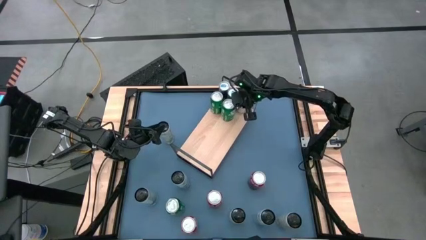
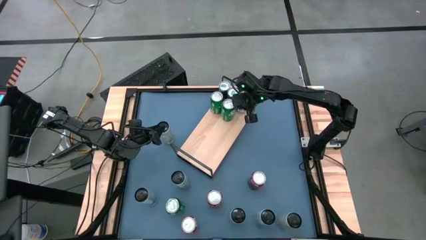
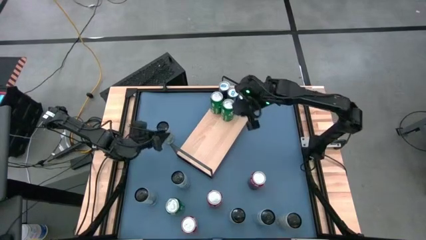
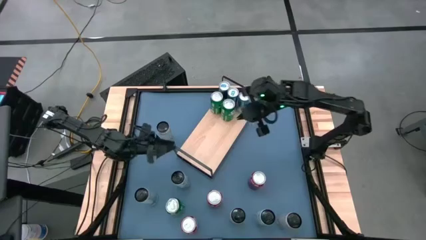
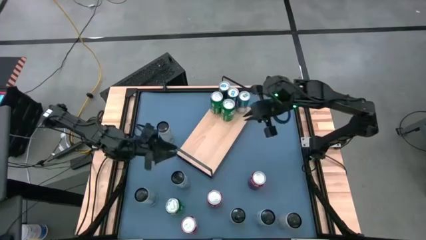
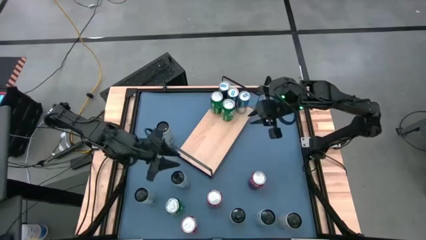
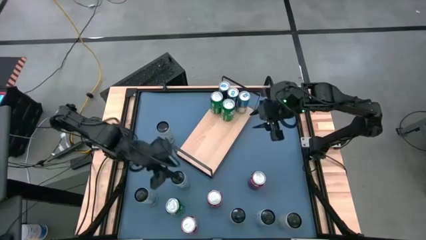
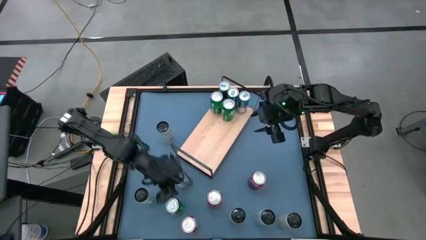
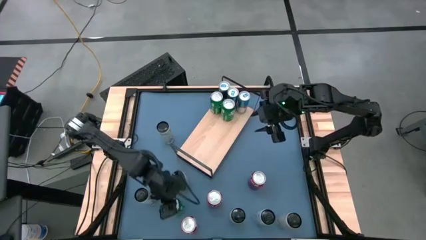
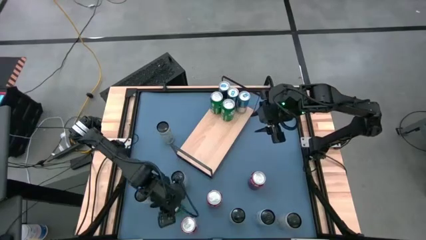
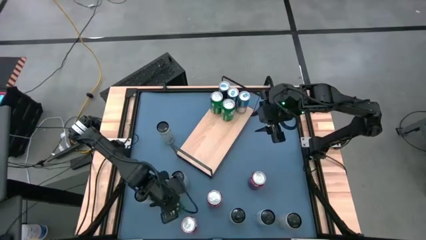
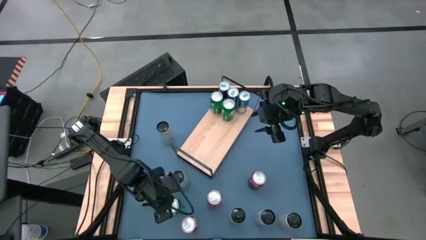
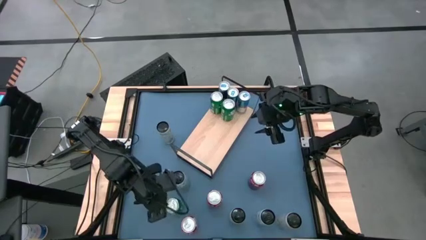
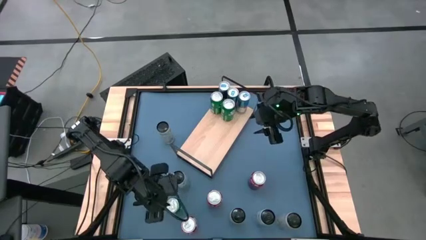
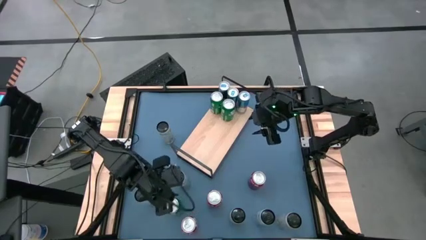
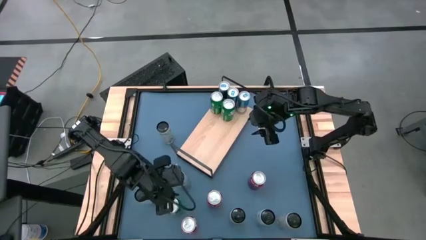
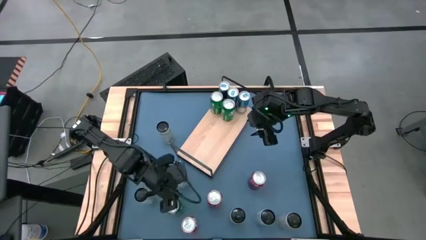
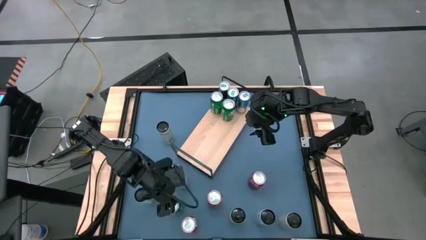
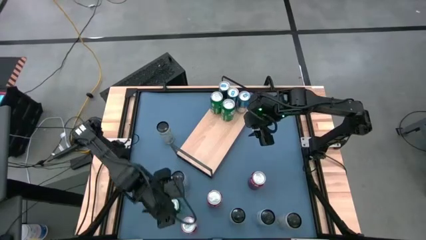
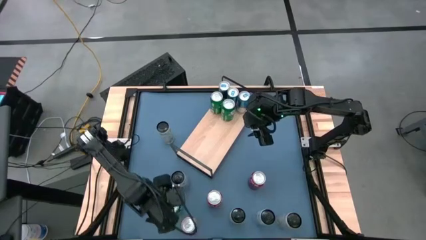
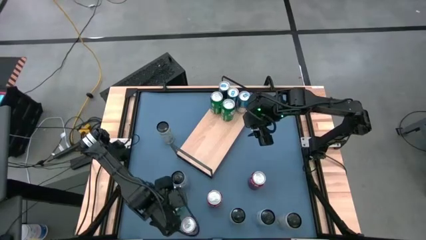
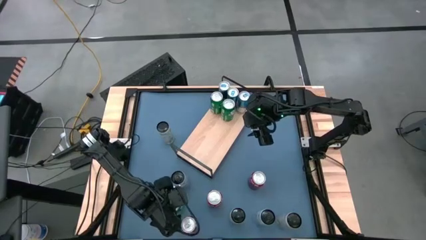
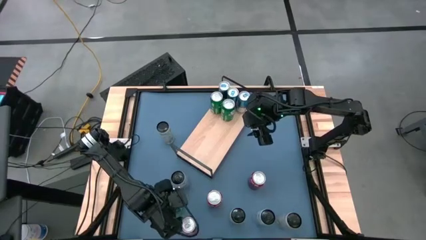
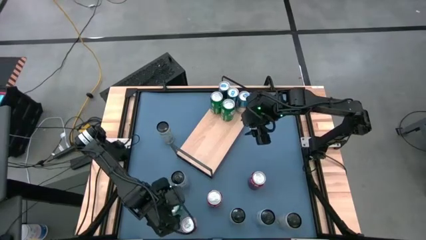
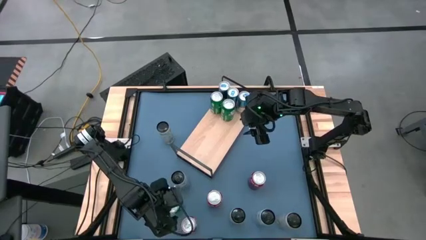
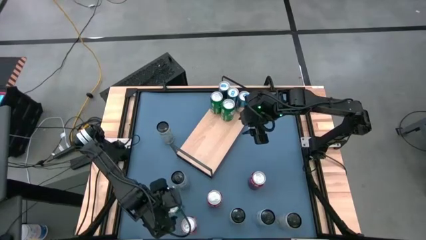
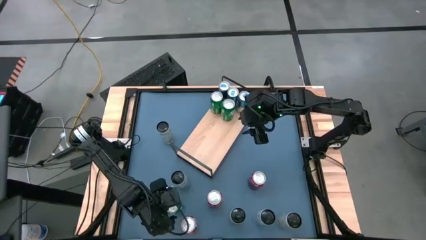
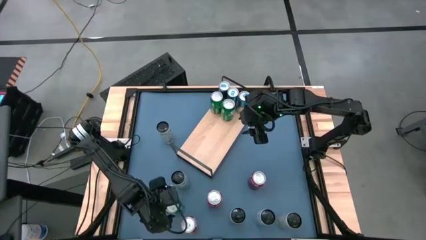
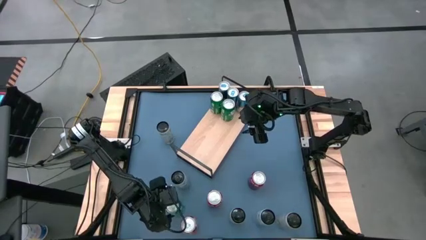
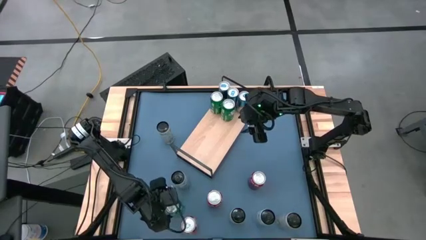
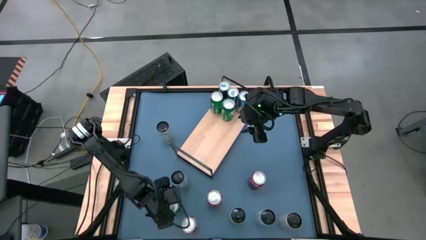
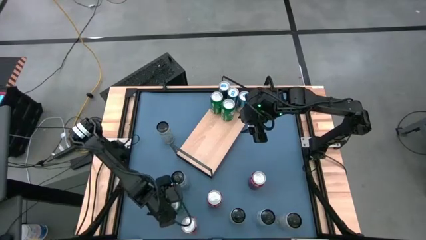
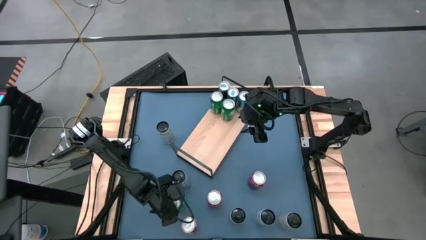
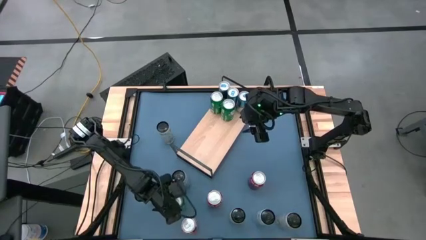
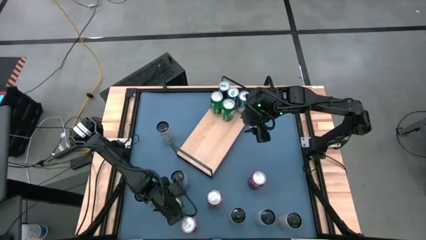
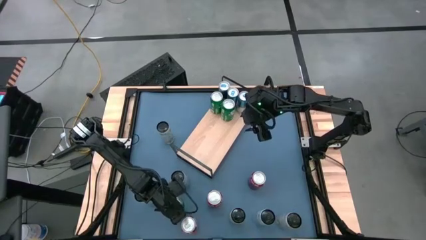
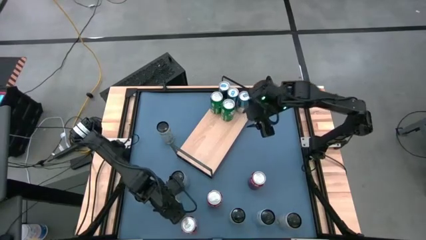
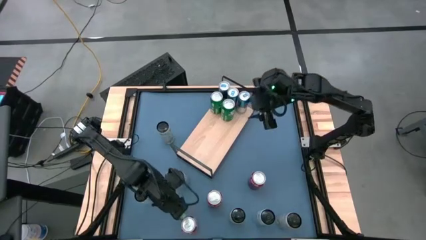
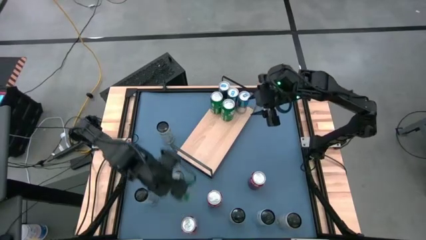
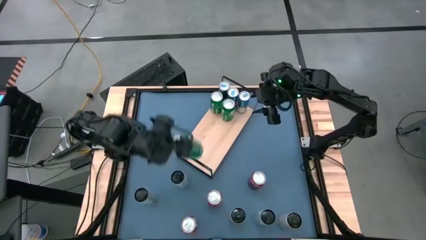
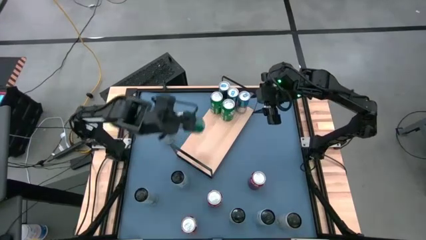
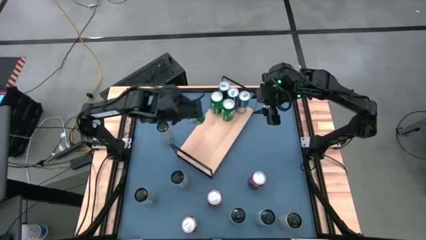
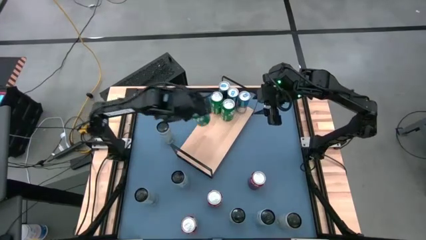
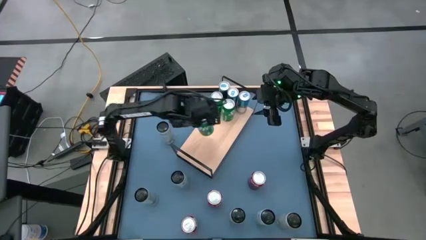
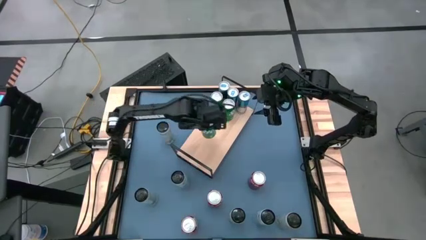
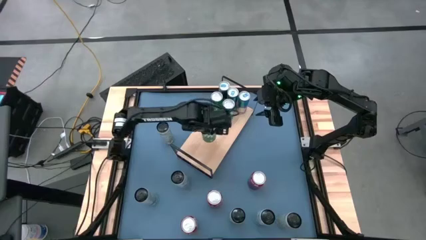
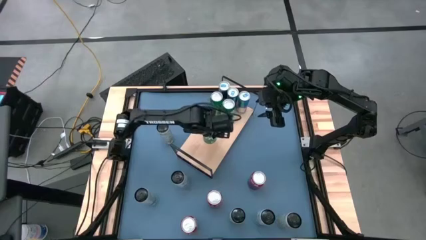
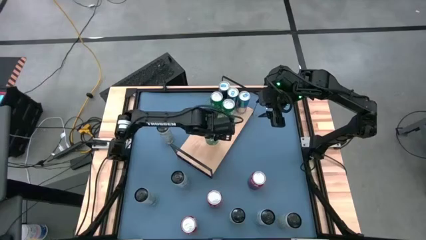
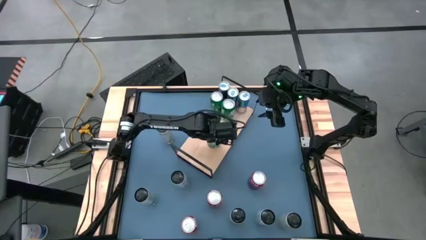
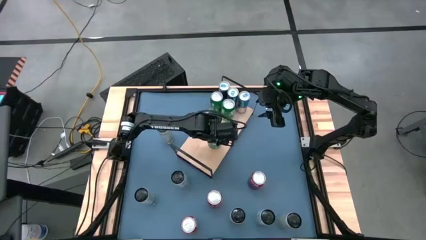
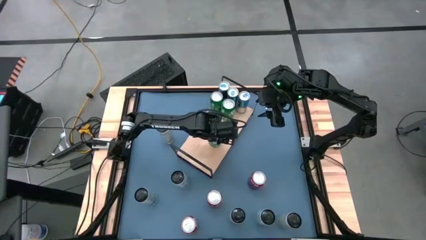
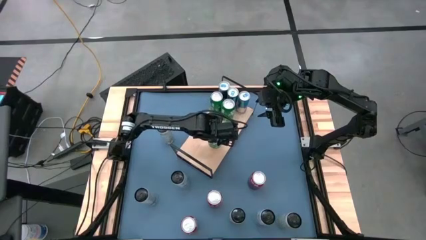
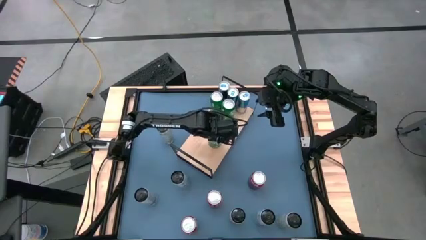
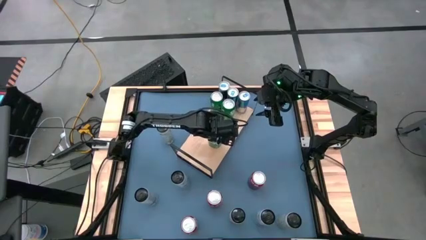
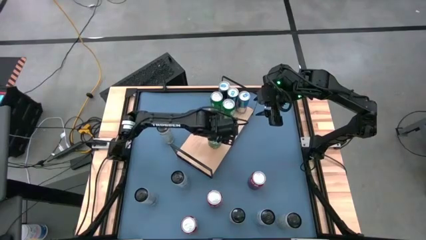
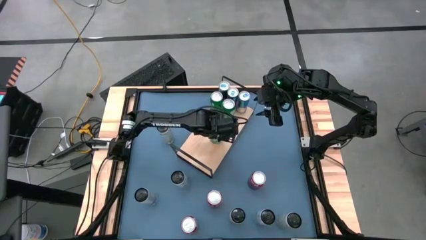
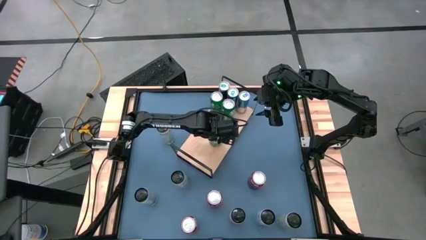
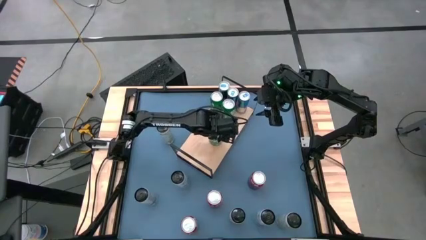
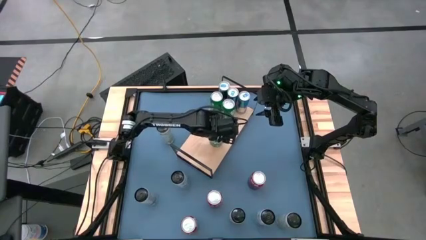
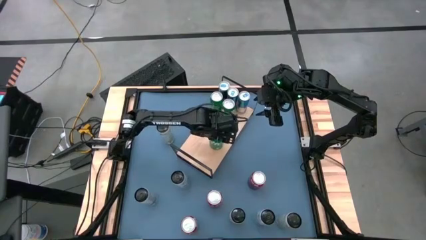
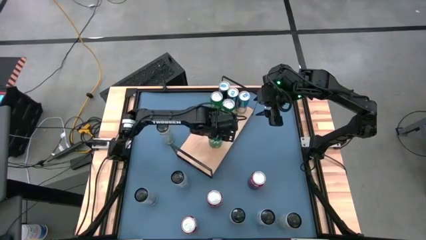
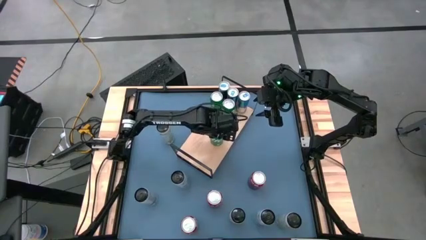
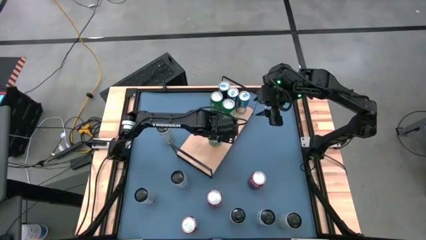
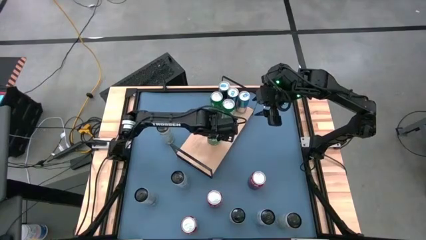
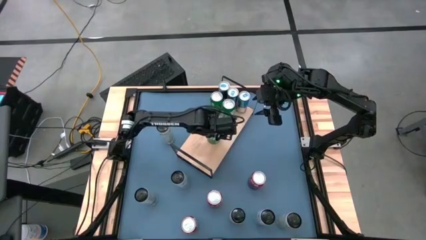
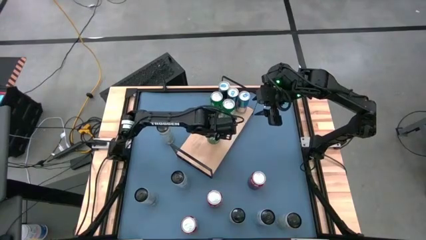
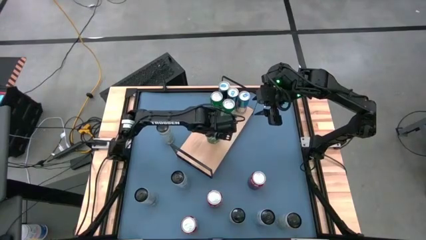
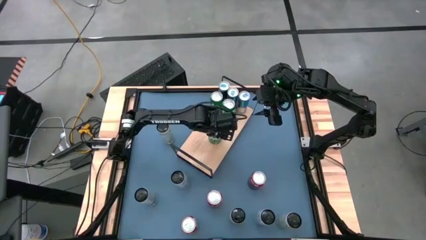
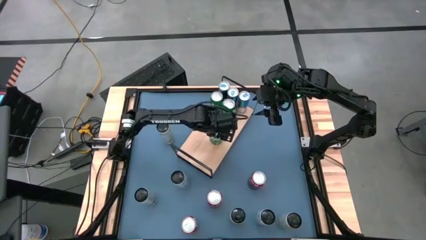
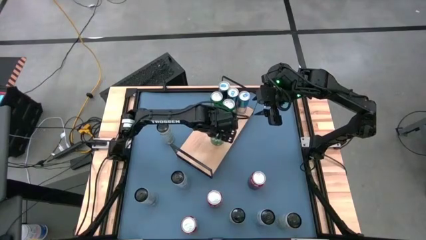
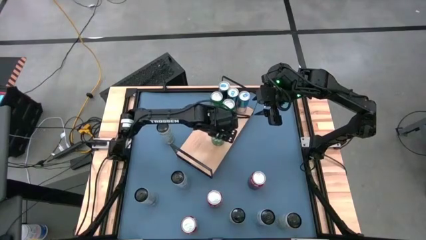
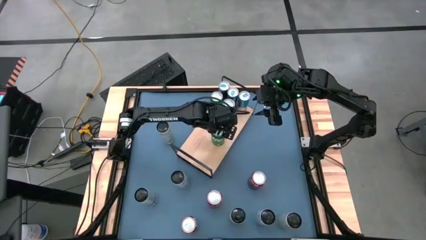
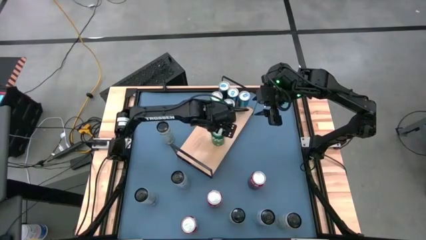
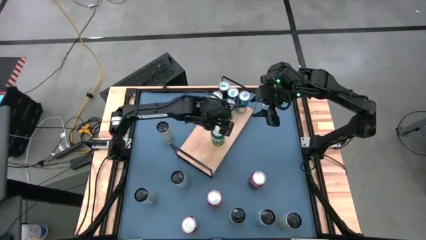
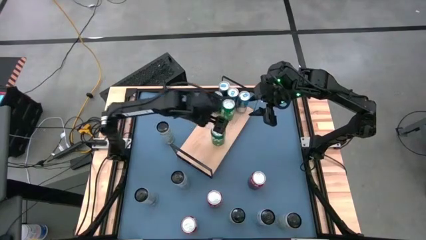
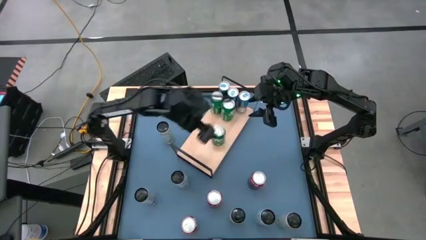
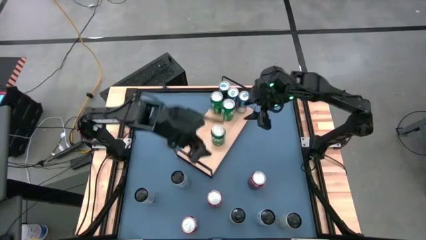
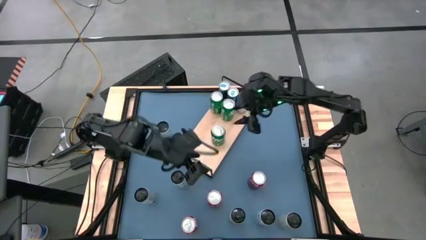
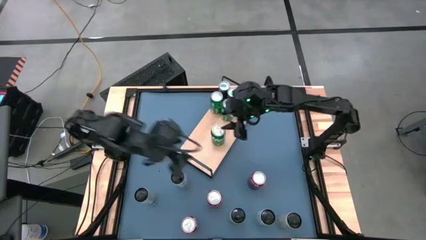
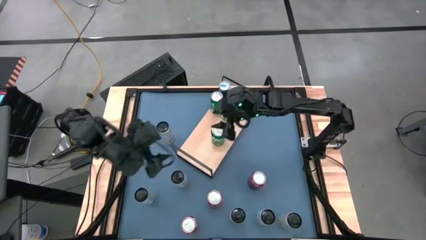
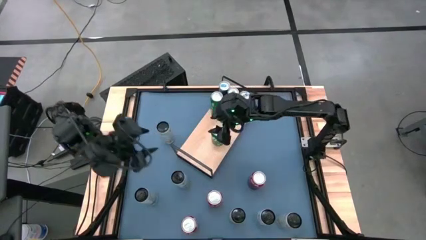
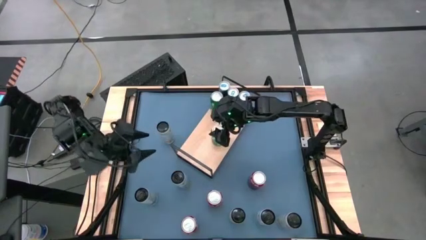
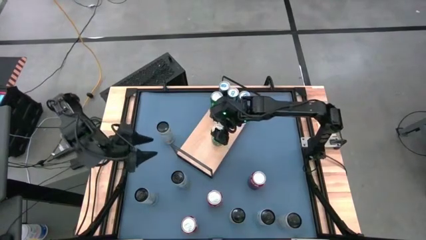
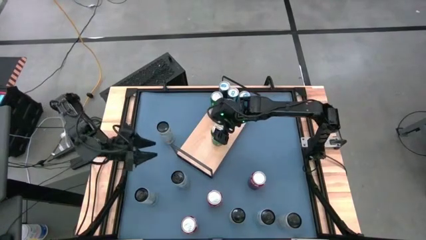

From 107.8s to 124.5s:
Task: Place canned beverage on shelf
Put green soda can on the shelf aligned with the other green soda cans
